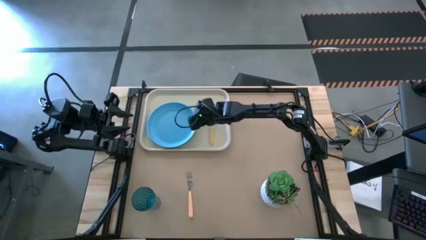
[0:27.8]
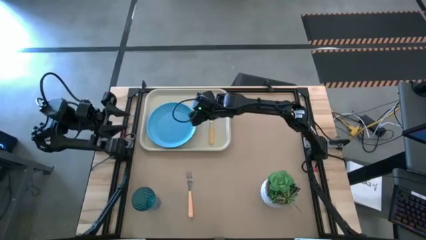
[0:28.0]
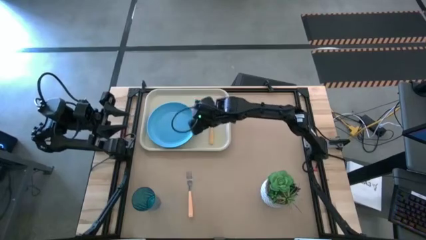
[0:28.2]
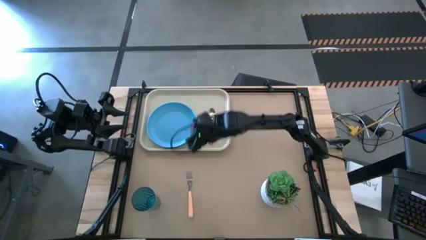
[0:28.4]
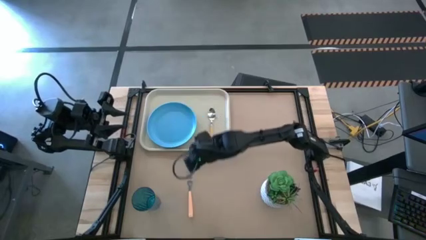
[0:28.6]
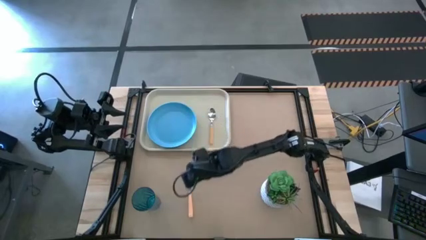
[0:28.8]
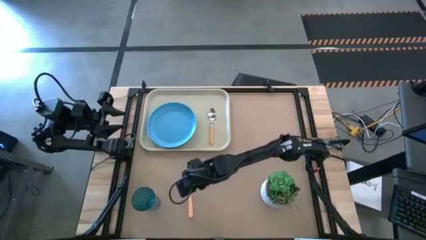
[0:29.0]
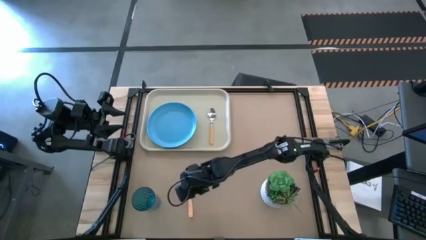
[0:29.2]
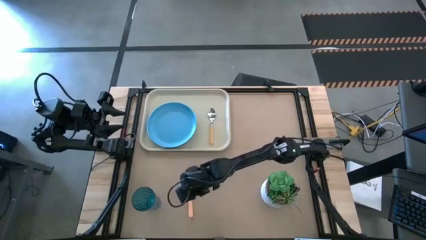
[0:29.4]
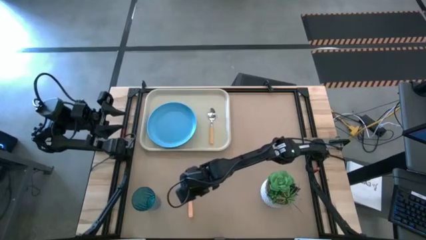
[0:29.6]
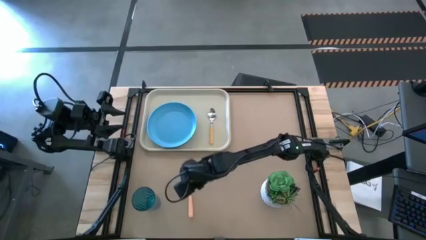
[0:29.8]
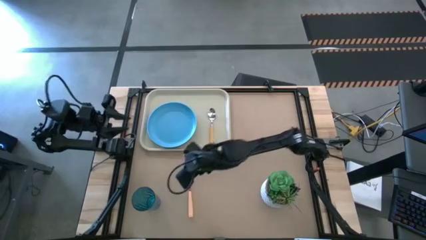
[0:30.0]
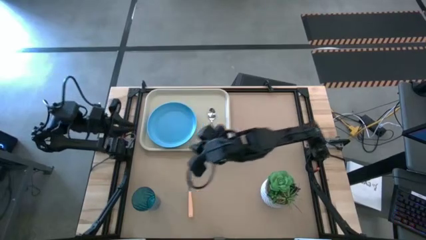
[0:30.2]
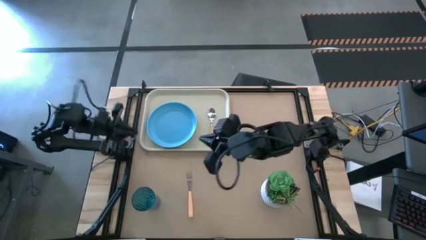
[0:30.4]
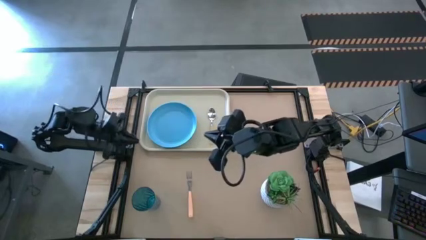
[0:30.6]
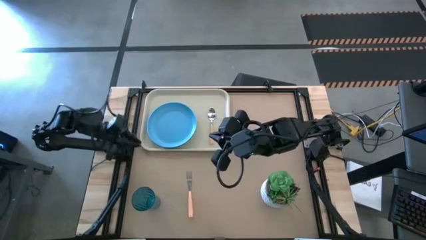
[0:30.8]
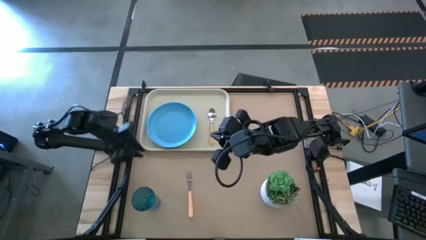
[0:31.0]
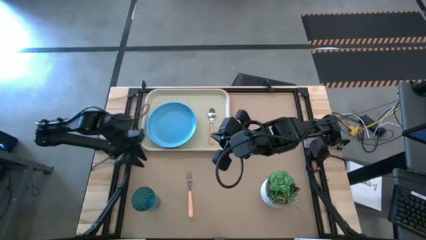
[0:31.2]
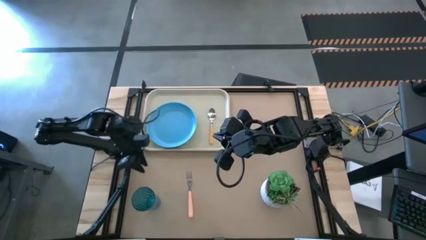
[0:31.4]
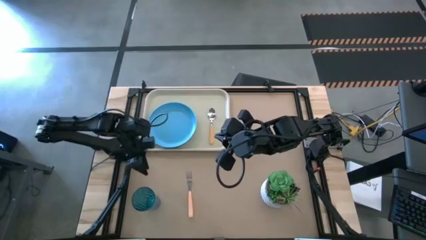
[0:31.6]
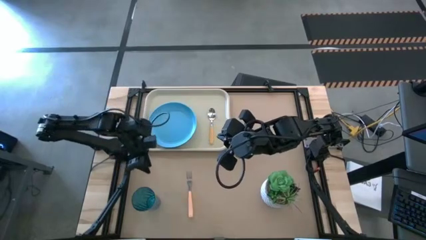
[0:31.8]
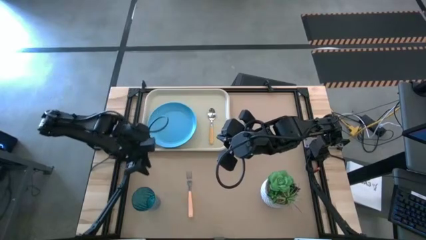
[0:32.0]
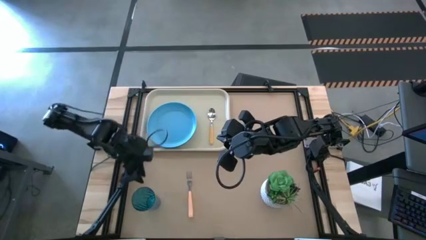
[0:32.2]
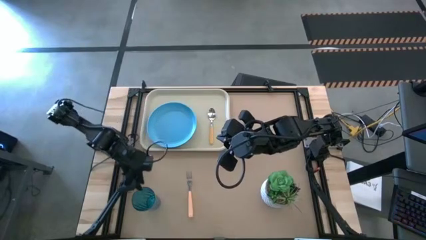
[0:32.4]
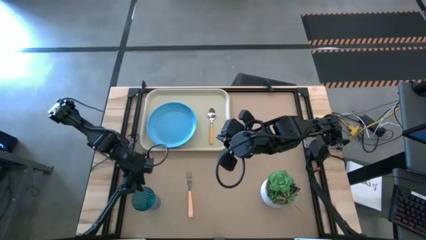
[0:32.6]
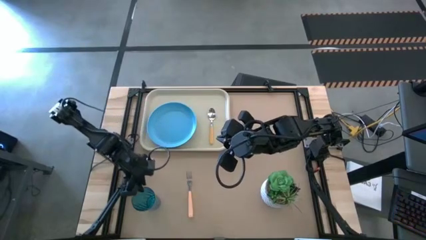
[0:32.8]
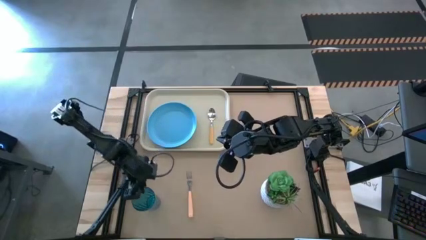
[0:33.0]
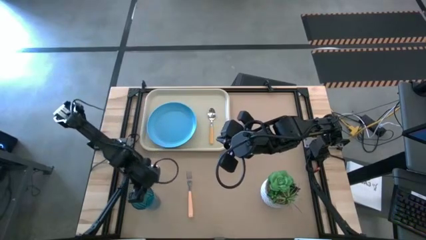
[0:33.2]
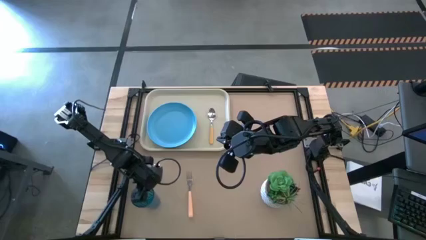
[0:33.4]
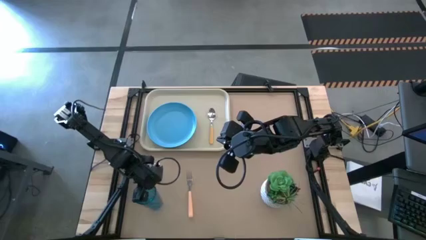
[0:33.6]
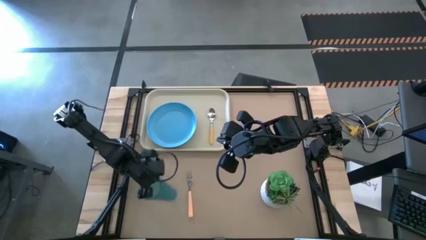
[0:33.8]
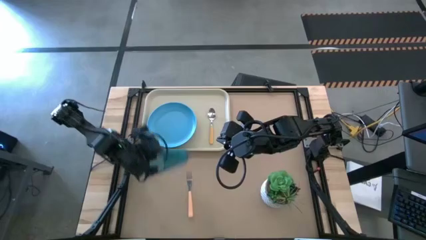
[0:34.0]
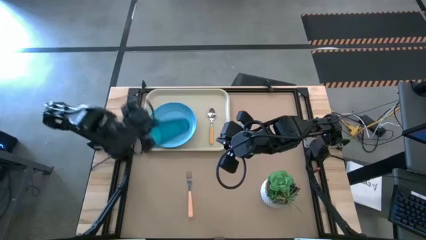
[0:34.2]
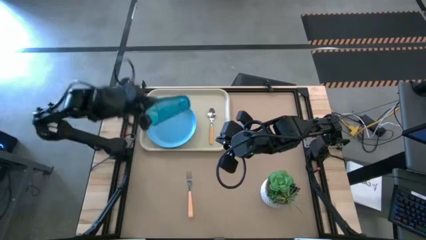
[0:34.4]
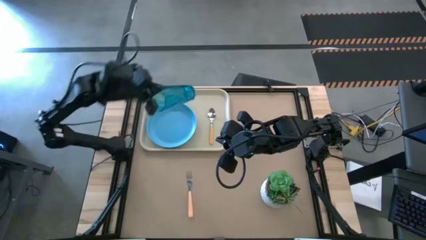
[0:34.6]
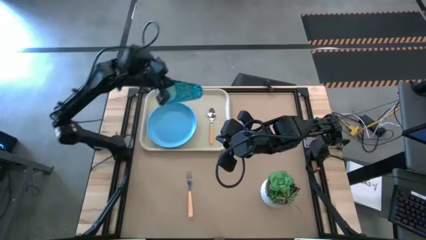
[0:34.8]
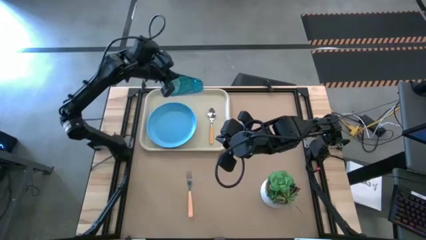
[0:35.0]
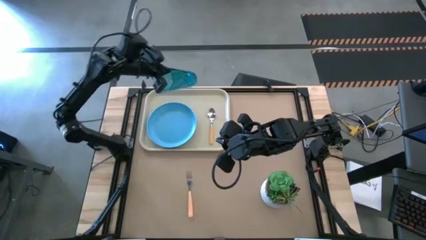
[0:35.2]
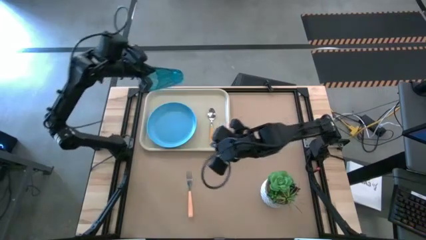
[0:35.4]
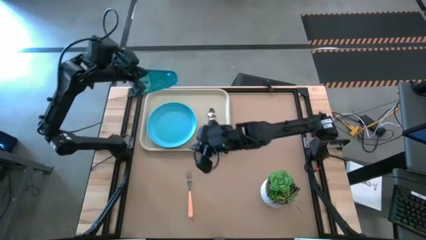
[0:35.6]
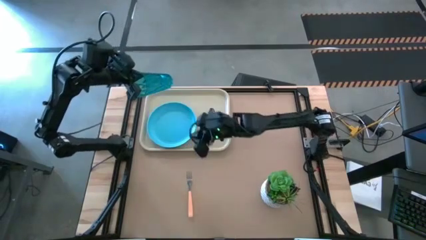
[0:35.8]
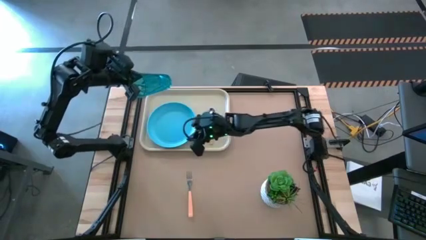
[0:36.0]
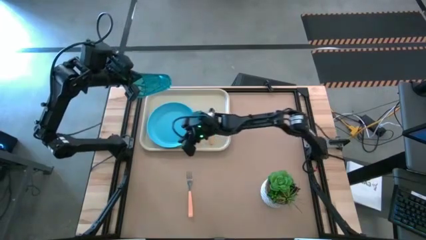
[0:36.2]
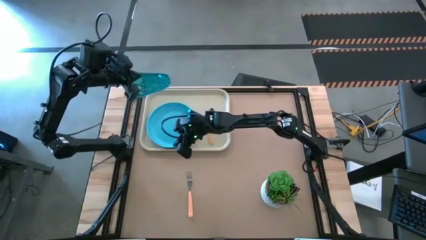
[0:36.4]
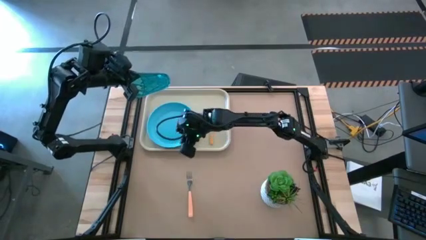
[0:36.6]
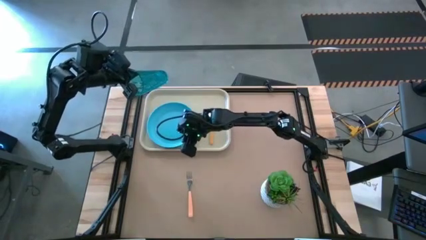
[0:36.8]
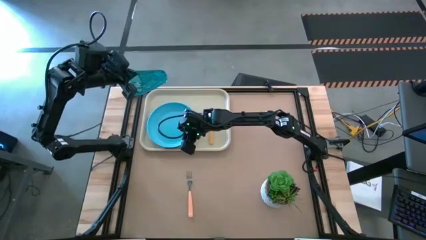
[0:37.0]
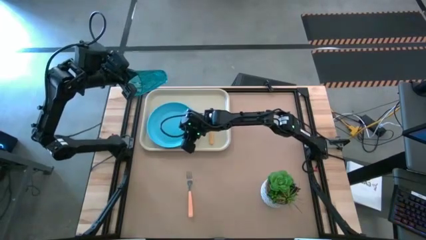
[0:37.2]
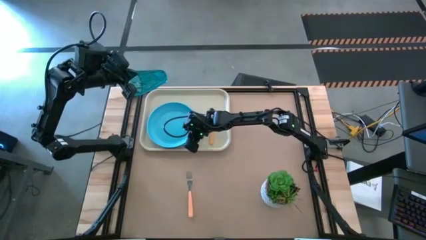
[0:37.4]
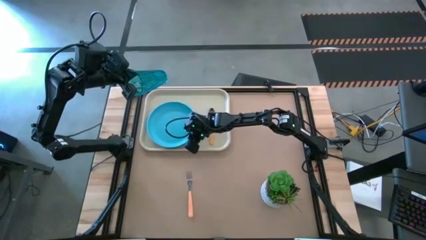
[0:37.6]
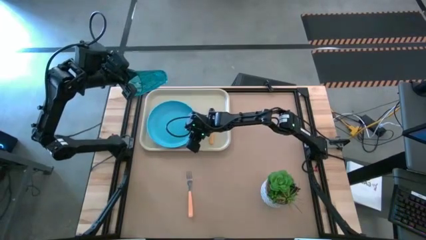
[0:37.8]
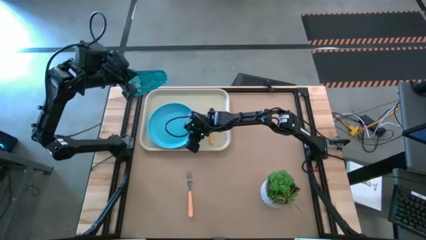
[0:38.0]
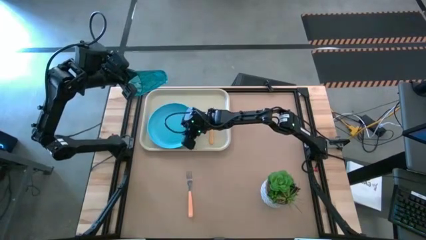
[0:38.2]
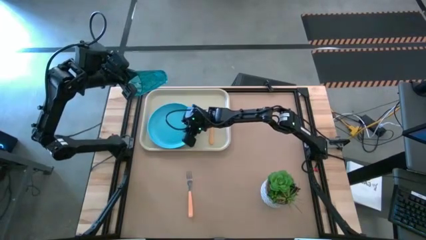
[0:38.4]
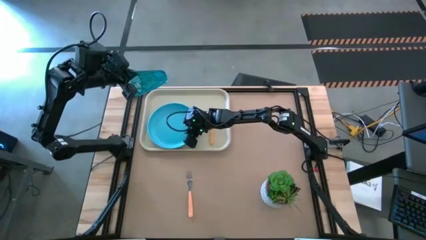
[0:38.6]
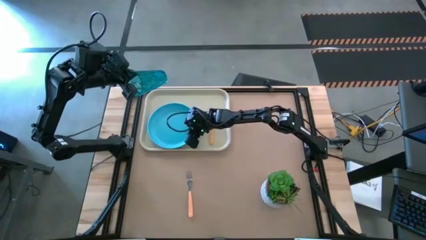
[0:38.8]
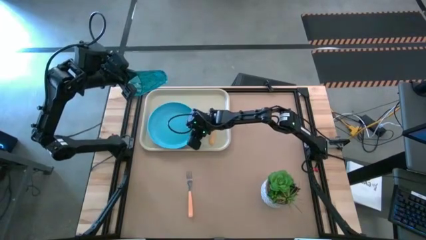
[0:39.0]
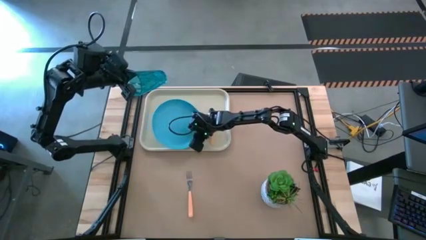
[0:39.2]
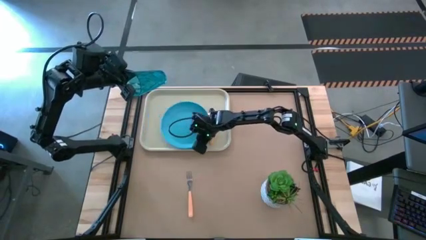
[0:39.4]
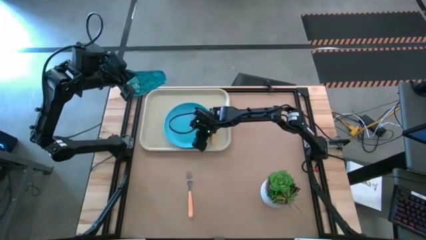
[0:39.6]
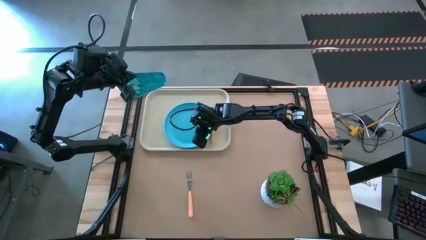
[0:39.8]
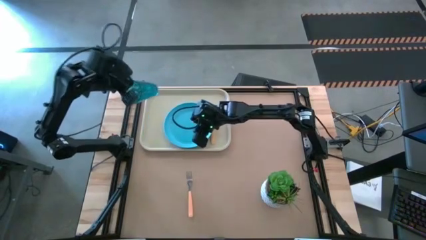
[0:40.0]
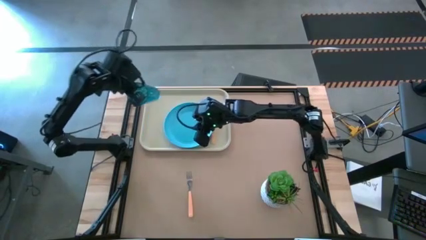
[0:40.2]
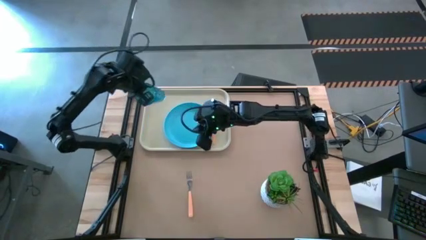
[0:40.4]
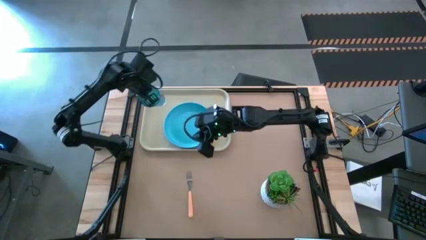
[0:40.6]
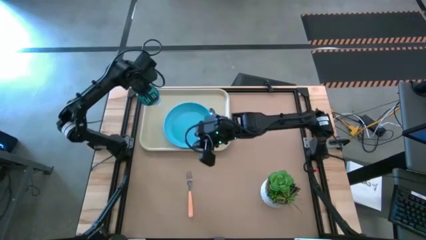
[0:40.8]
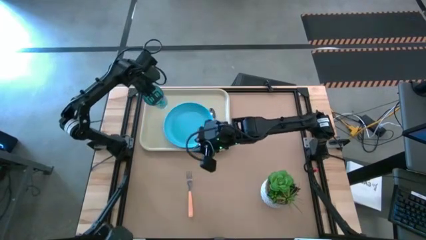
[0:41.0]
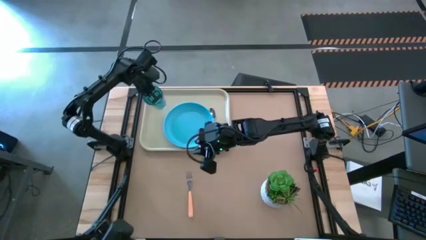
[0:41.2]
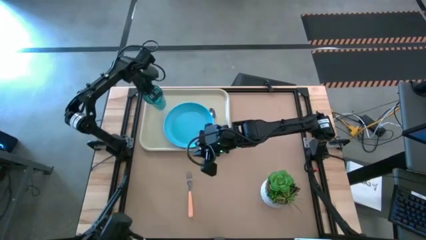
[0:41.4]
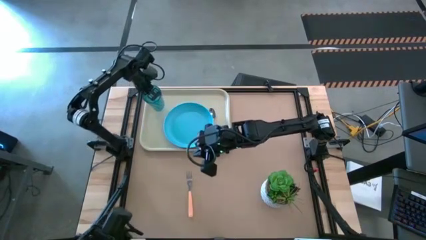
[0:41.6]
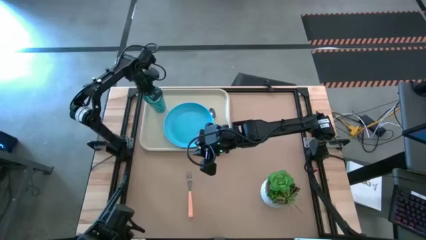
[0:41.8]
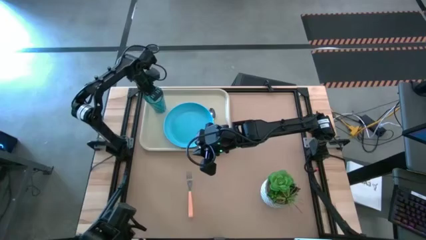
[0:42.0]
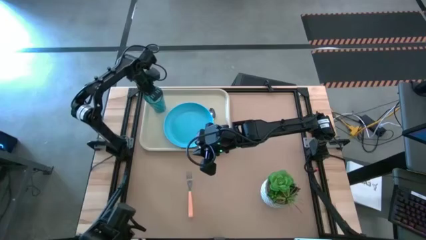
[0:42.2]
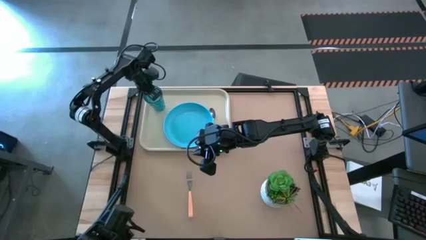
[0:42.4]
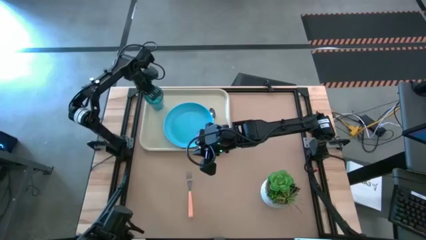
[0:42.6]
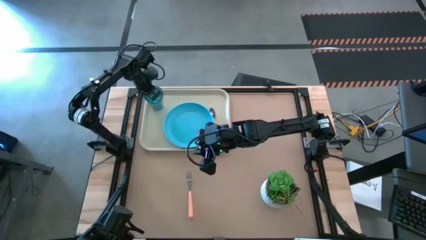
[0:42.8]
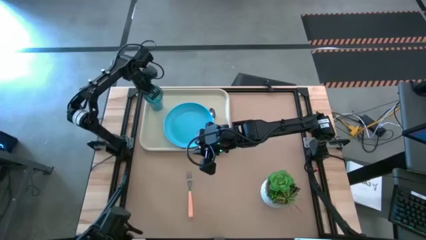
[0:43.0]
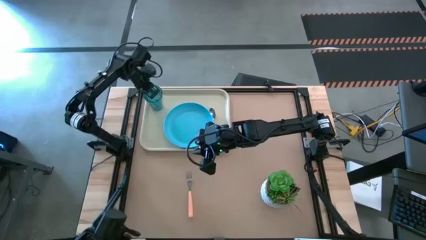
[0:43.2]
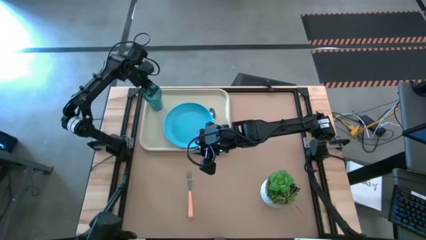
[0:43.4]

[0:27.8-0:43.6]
Task: Pick and place plate/cup/fork/spoon on tray
Put the blue cup on the white serving tray to the top right of the light blue plate
